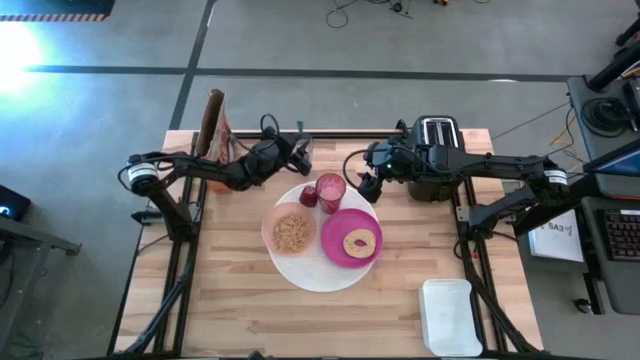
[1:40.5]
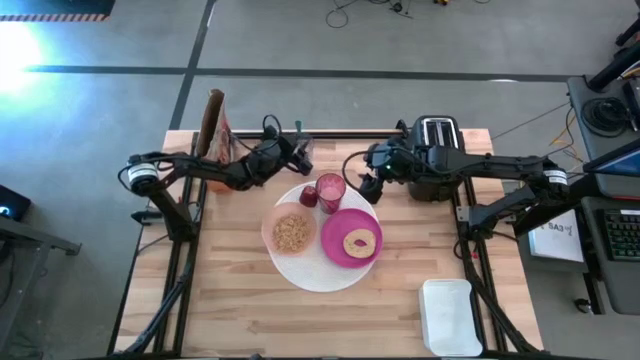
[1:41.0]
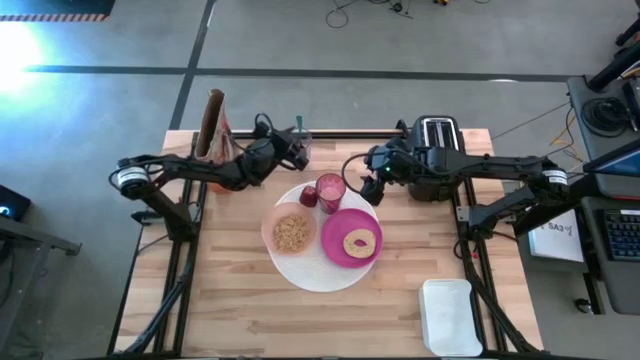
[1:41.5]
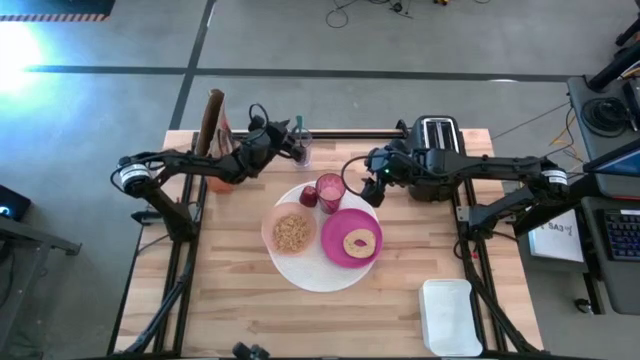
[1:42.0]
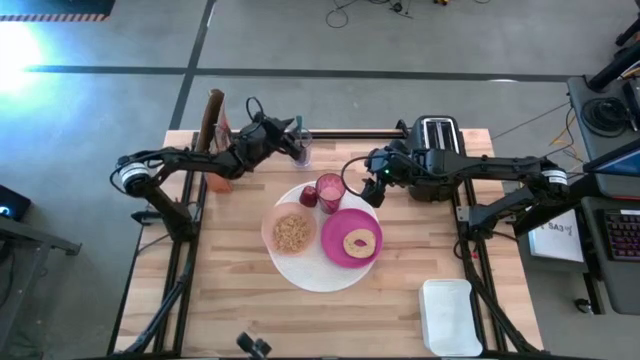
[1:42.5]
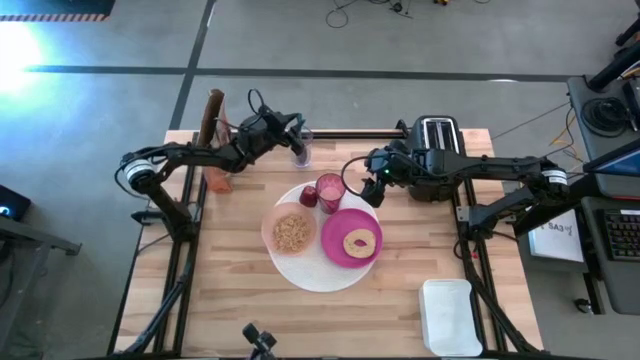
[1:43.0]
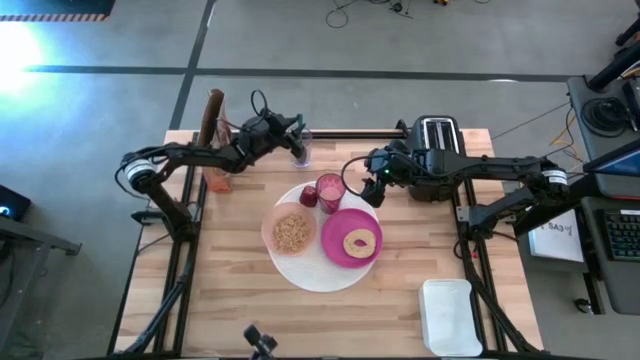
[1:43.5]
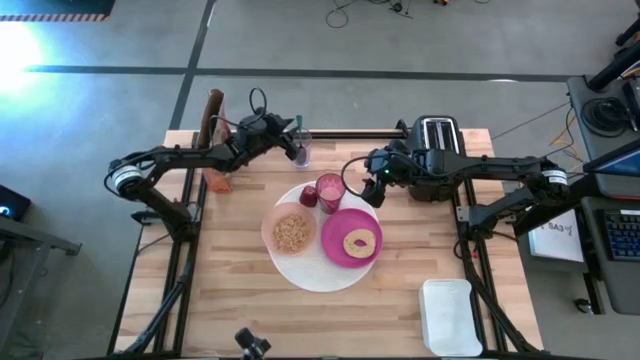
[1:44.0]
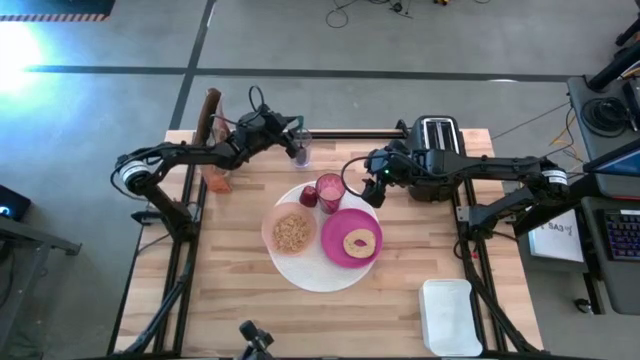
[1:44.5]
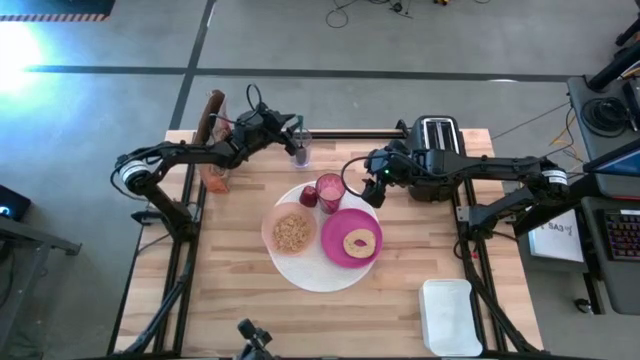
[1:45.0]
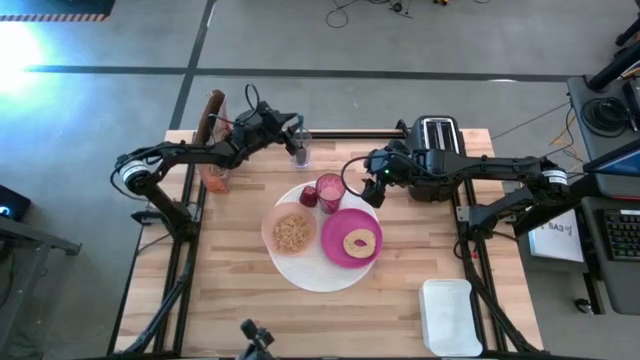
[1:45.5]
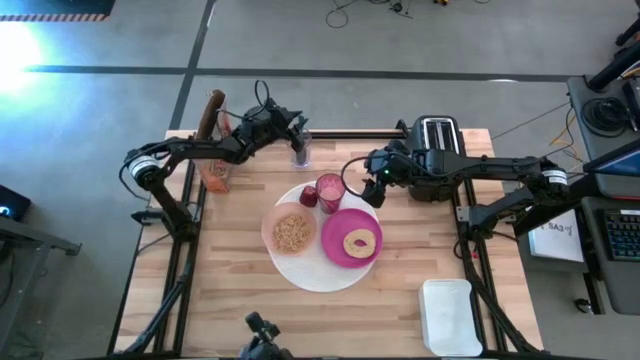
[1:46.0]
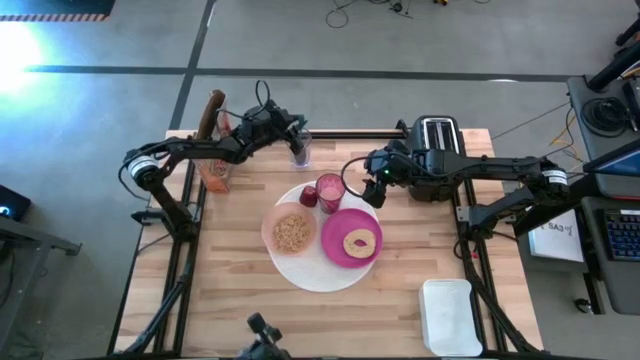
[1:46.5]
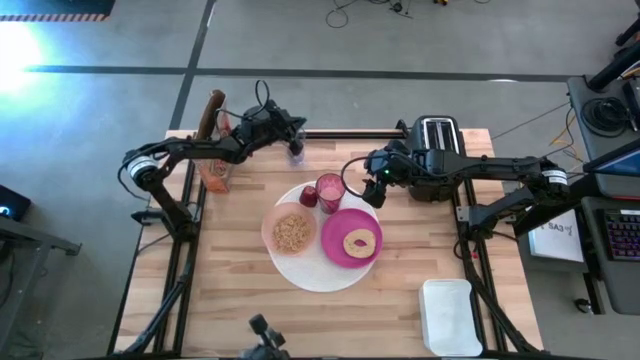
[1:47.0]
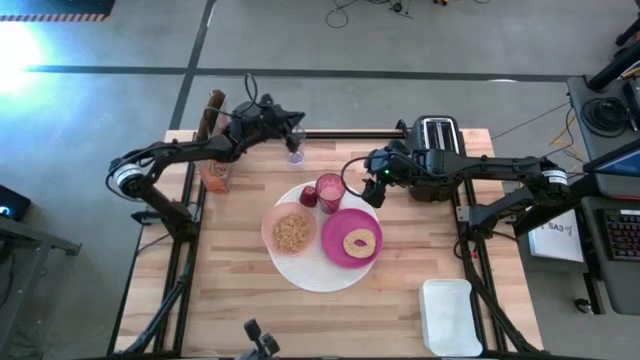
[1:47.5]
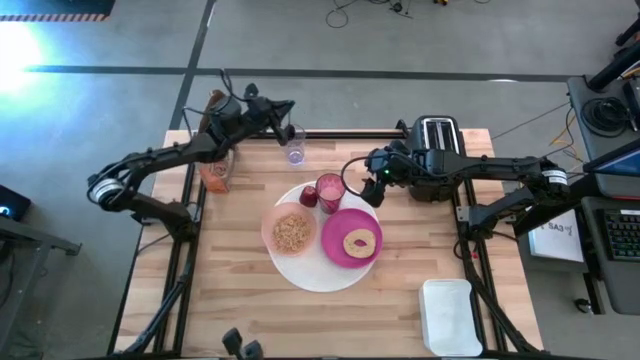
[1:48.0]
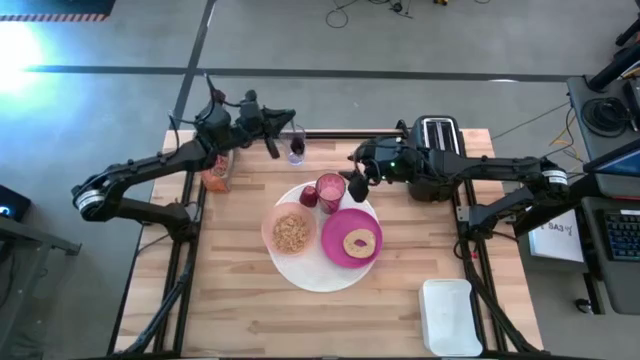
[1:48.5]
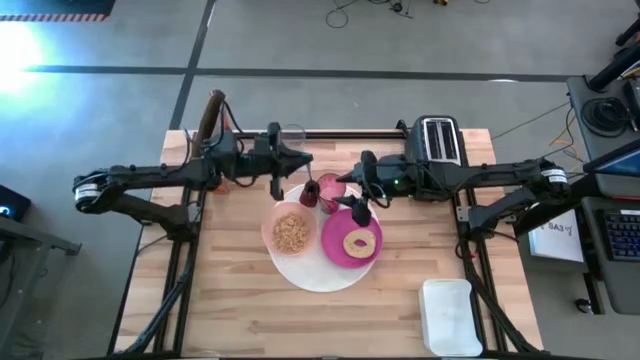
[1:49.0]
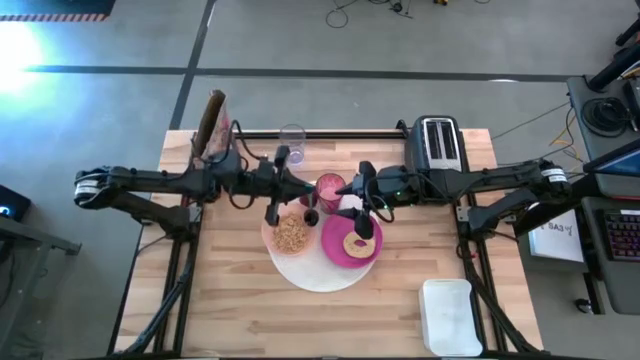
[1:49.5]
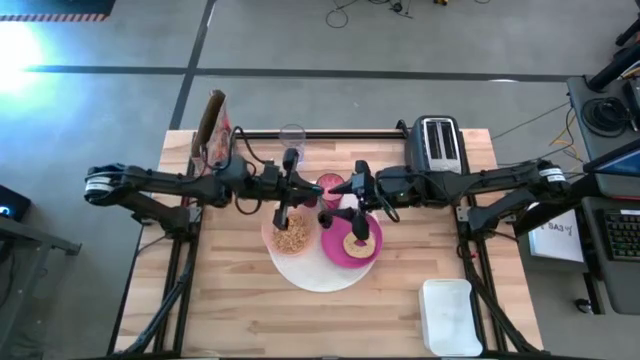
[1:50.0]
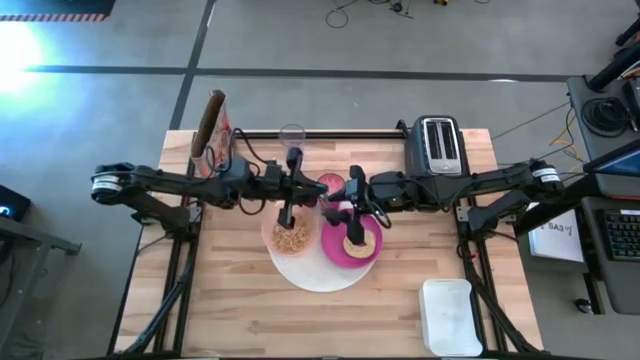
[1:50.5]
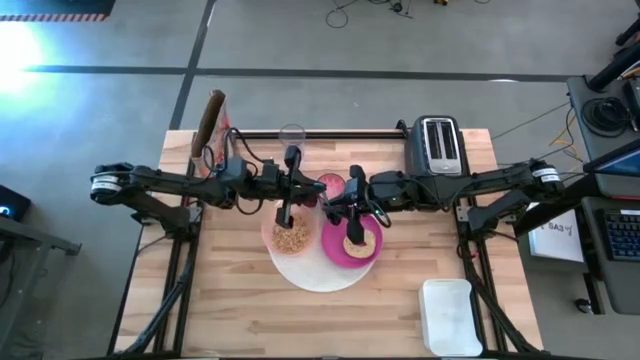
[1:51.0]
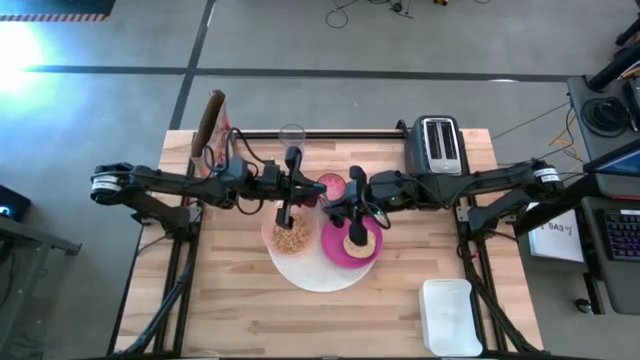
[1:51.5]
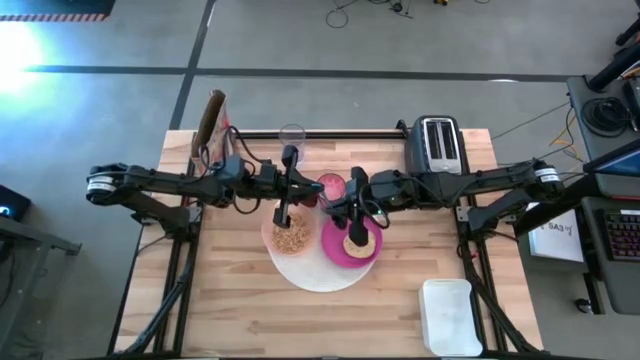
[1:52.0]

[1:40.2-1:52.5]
Task: Arrange a breakfast setting
Put the blue spoon beside the orange bowl

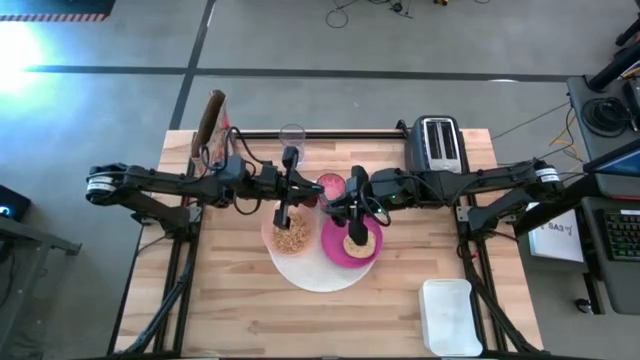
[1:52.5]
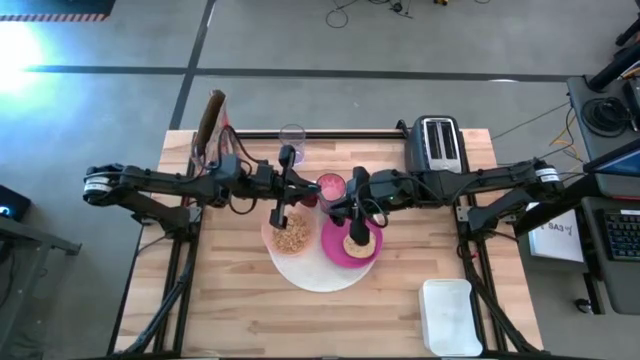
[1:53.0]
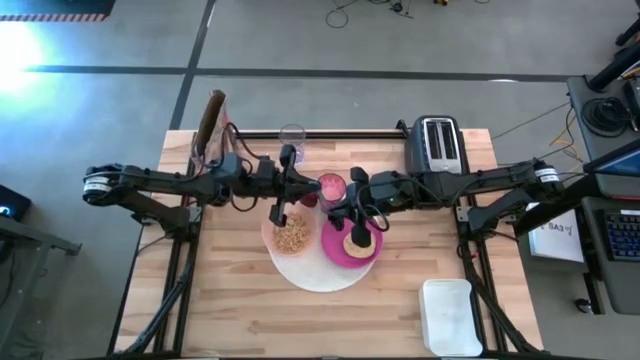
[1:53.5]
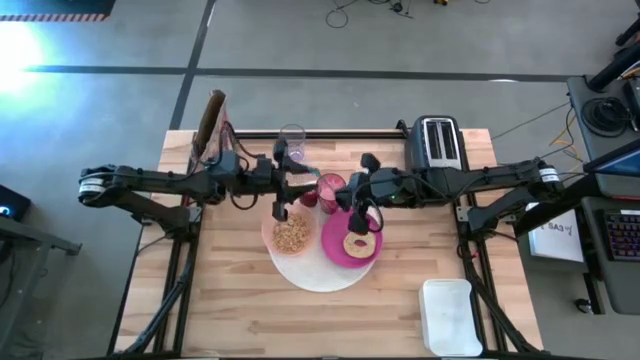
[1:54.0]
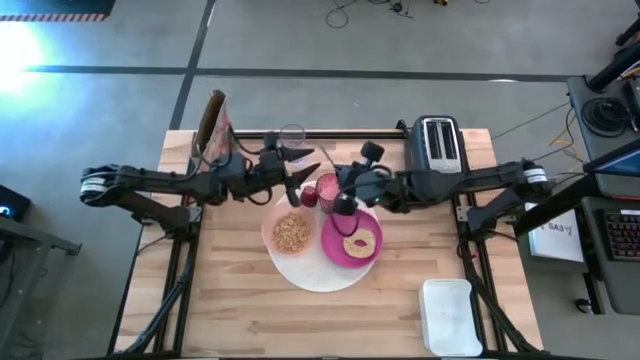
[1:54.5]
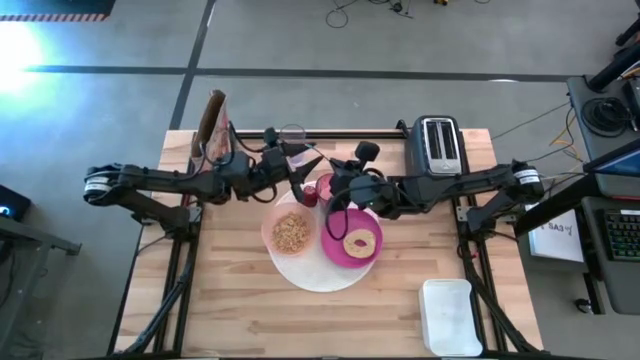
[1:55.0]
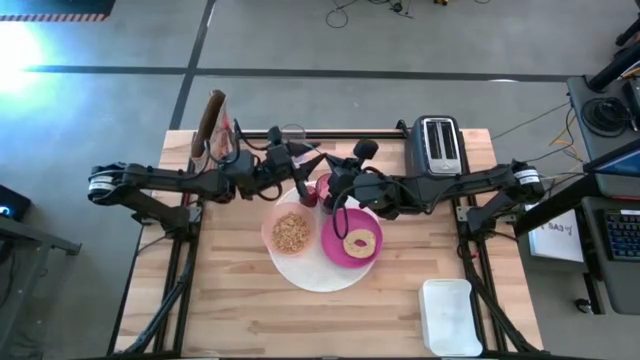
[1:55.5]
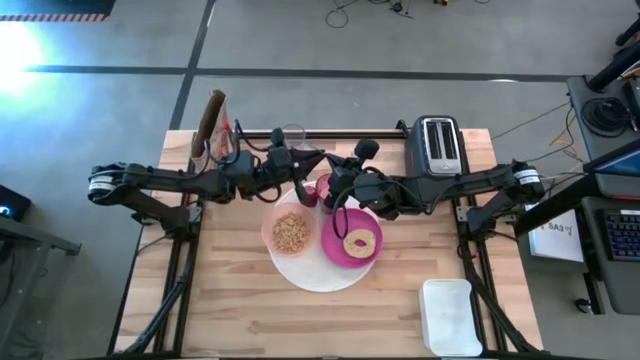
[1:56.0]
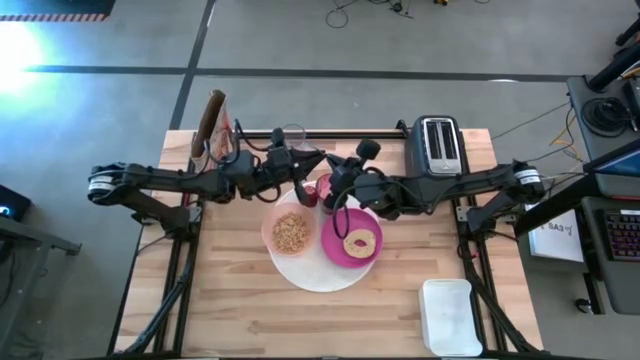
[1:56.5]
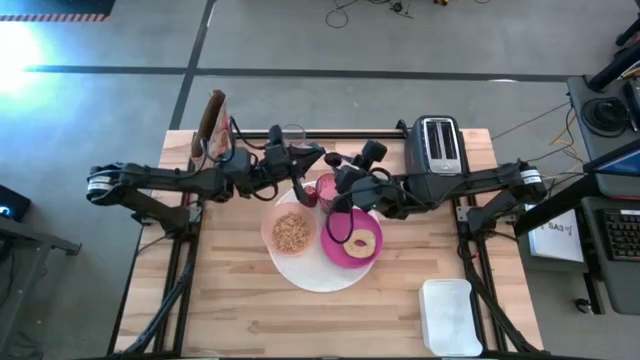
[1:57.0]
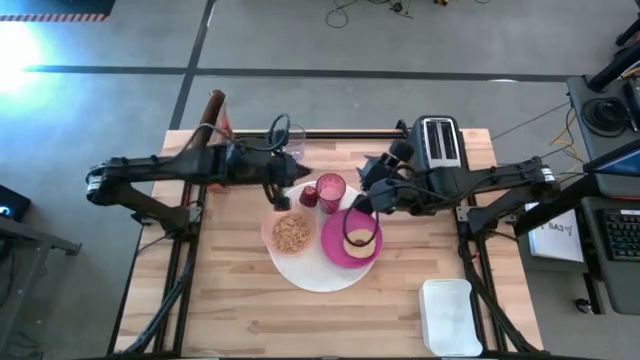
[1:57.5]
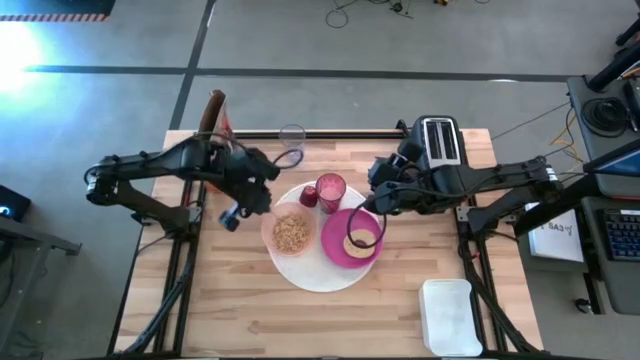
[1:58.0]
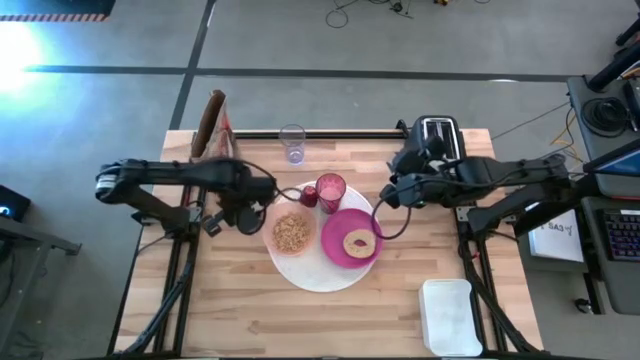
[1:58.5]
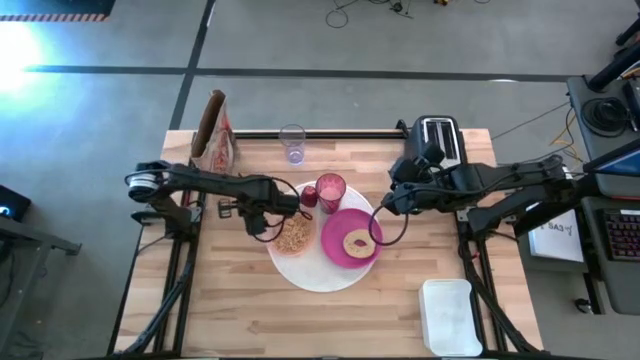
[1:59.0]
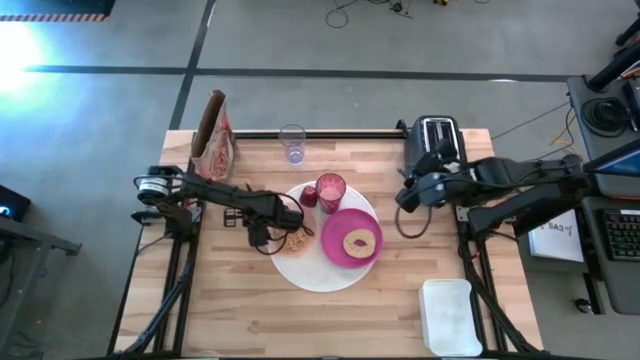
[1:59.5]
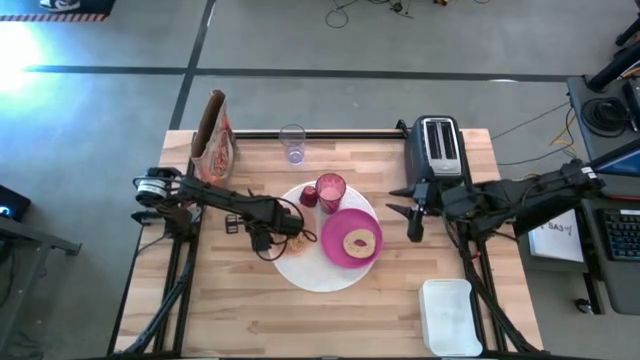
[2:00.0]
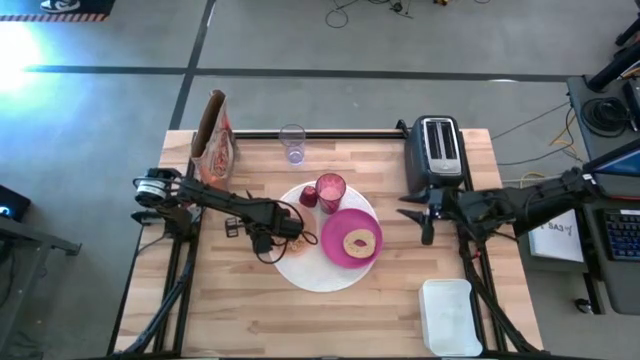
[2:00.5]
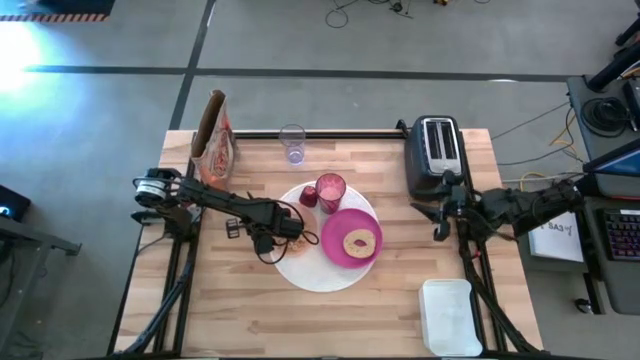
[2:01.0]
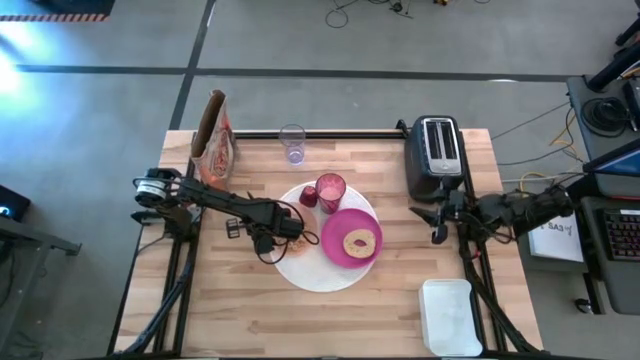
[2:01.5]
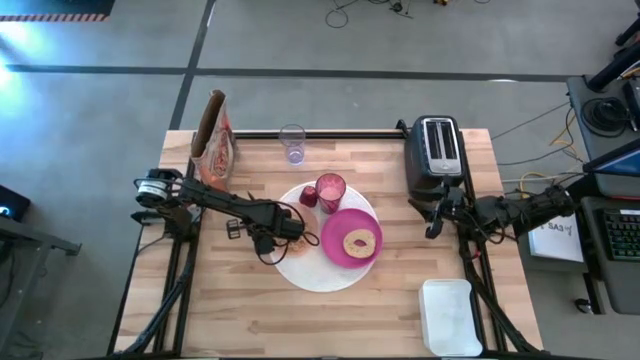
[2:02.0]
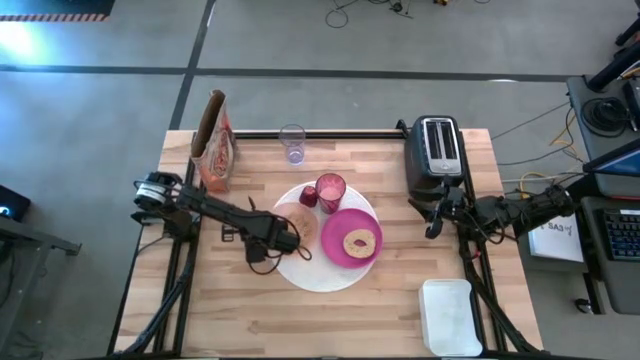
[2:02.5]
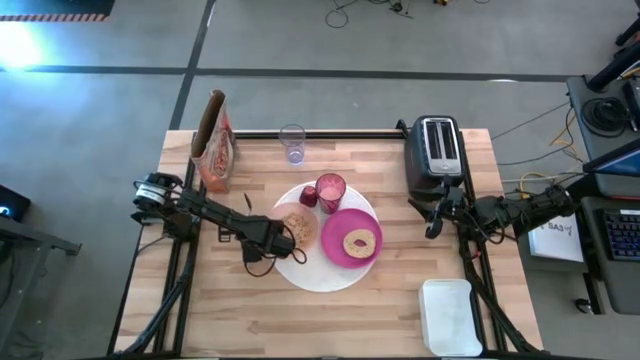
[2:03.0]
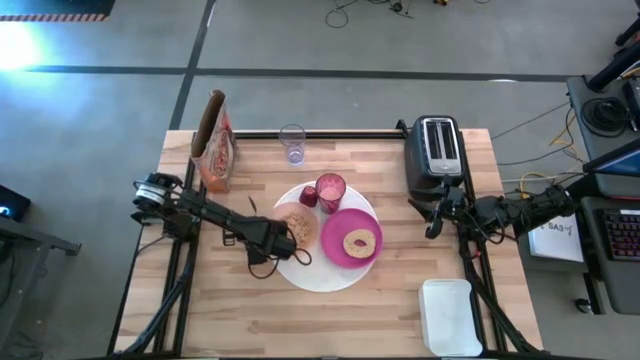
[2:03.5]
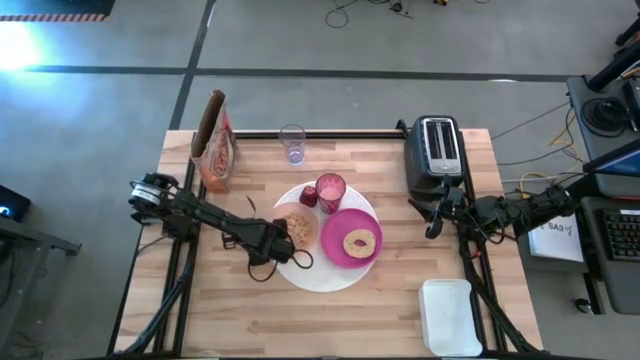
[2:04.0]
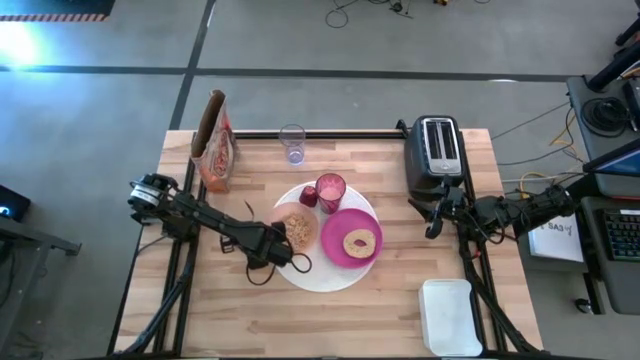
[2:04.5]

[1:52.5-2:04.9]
Put the blue spoon beside the orange bowl
